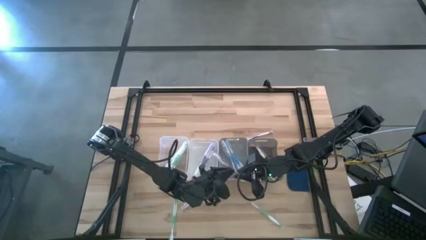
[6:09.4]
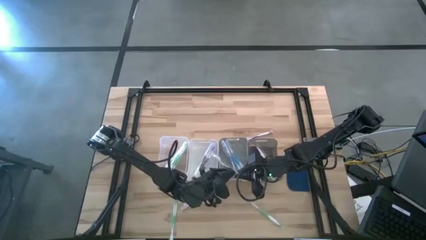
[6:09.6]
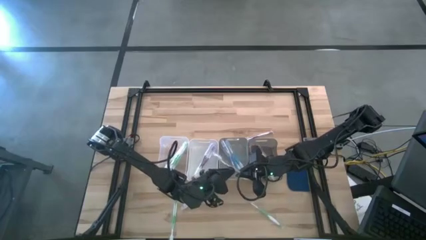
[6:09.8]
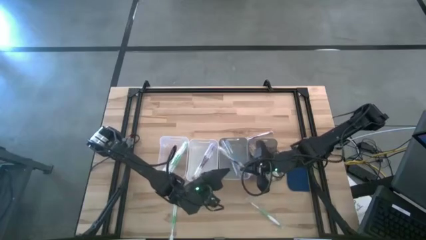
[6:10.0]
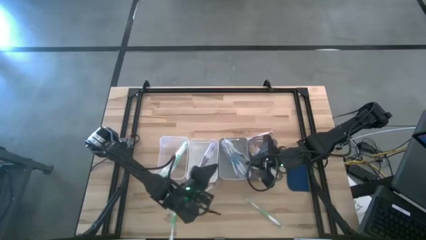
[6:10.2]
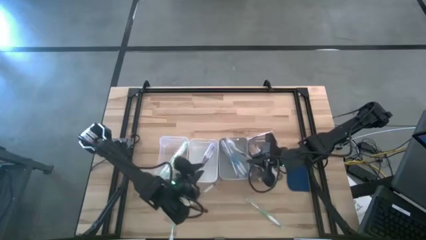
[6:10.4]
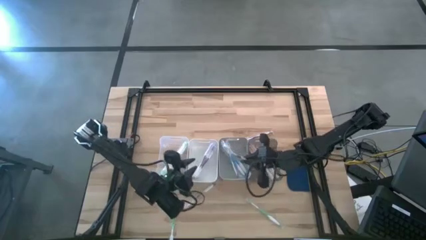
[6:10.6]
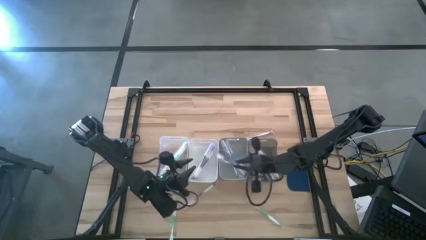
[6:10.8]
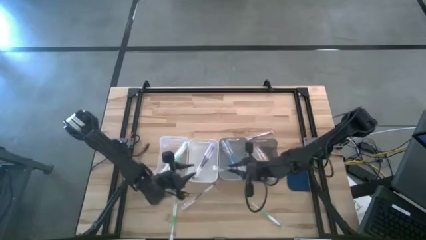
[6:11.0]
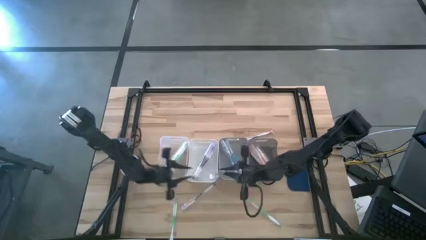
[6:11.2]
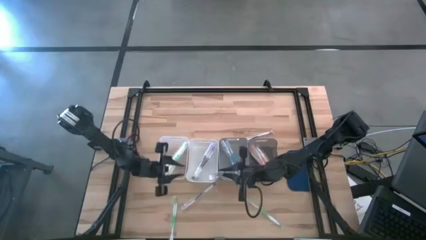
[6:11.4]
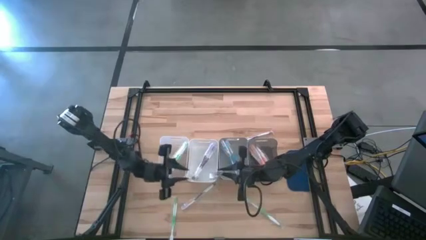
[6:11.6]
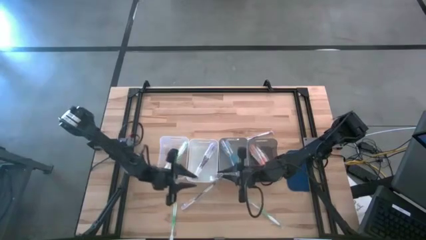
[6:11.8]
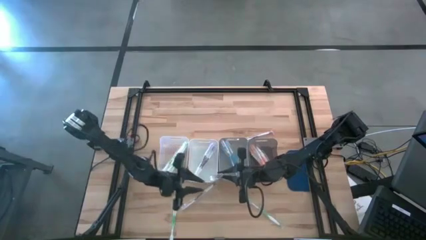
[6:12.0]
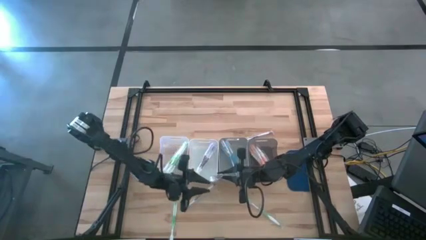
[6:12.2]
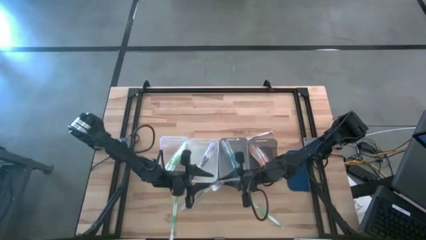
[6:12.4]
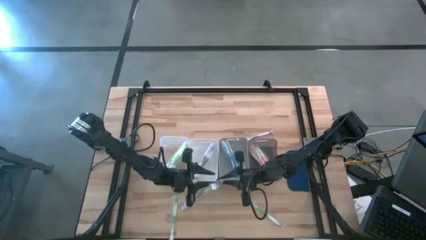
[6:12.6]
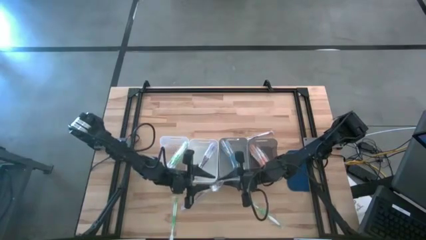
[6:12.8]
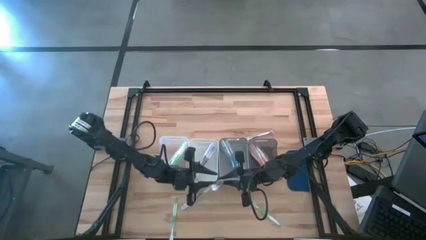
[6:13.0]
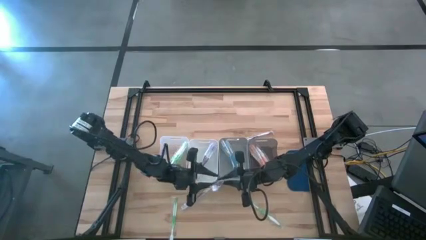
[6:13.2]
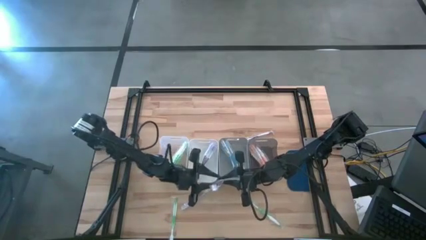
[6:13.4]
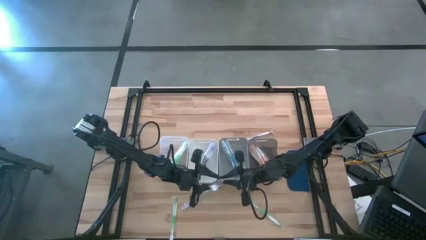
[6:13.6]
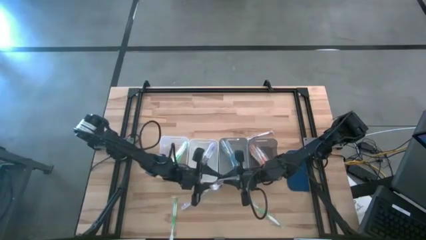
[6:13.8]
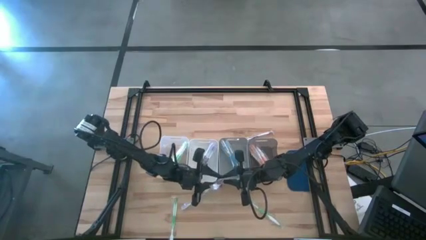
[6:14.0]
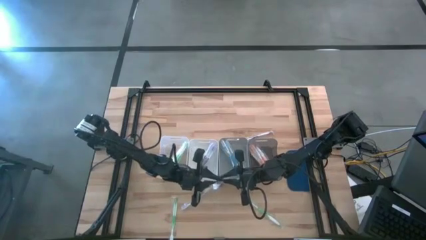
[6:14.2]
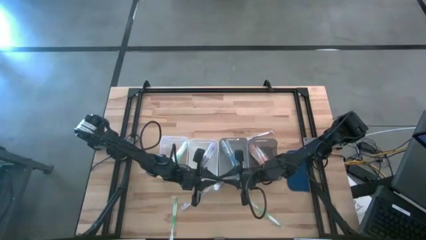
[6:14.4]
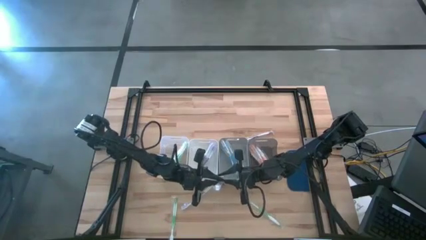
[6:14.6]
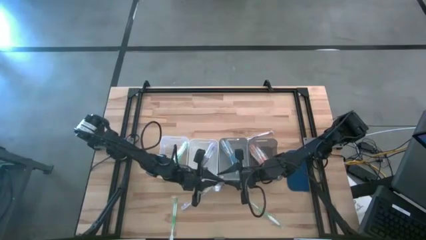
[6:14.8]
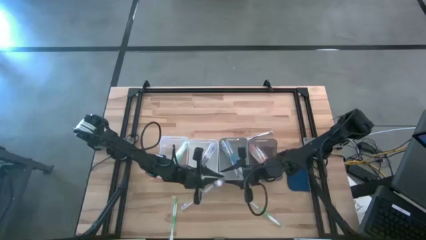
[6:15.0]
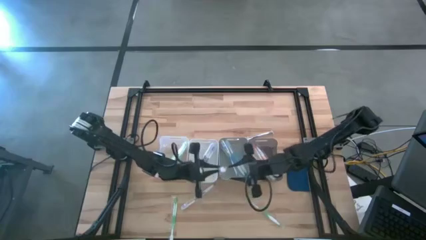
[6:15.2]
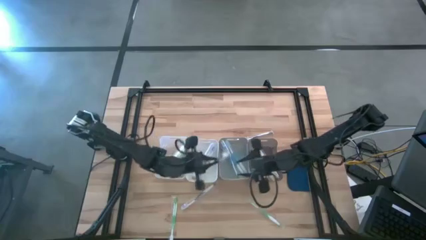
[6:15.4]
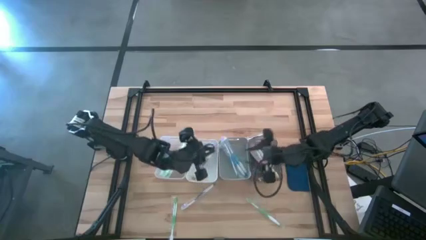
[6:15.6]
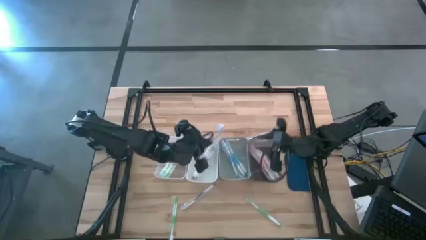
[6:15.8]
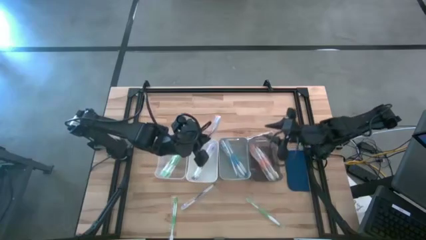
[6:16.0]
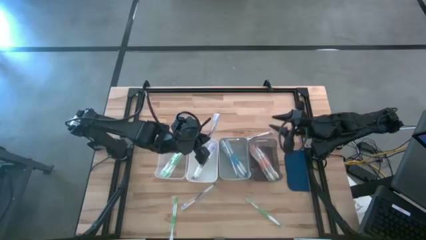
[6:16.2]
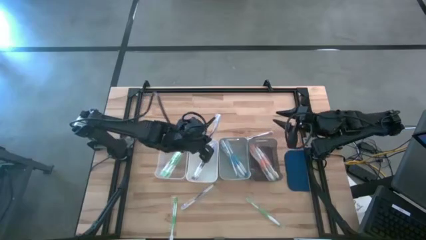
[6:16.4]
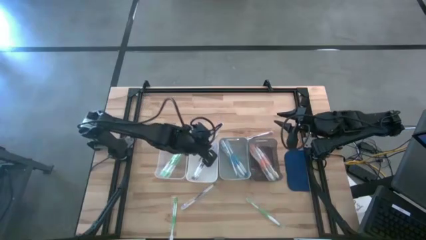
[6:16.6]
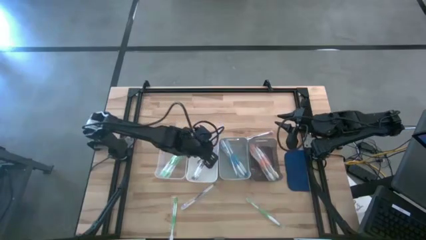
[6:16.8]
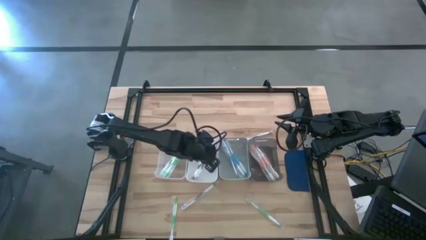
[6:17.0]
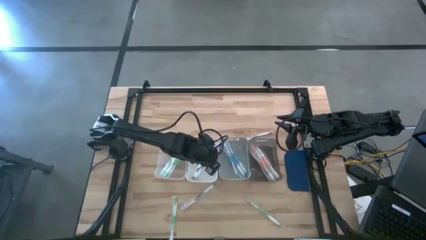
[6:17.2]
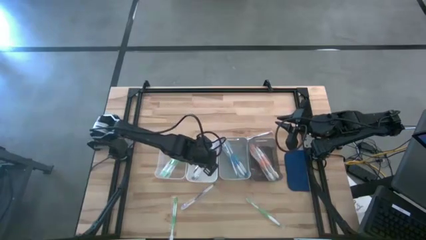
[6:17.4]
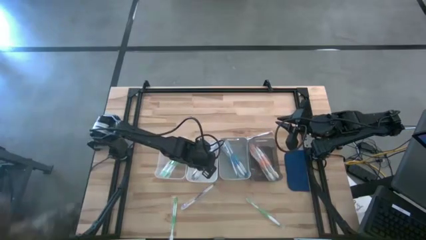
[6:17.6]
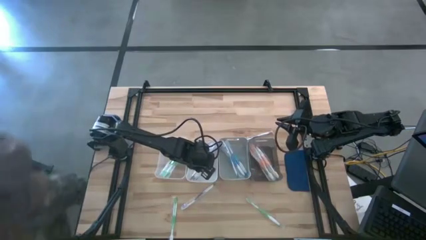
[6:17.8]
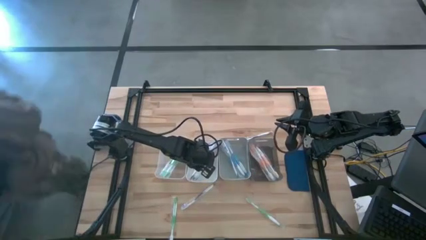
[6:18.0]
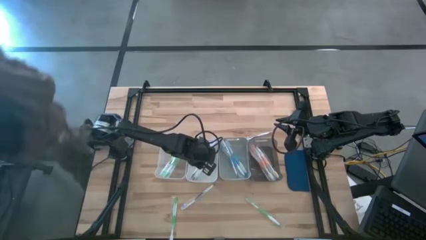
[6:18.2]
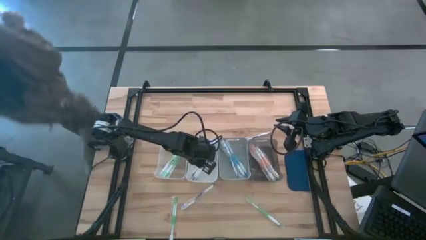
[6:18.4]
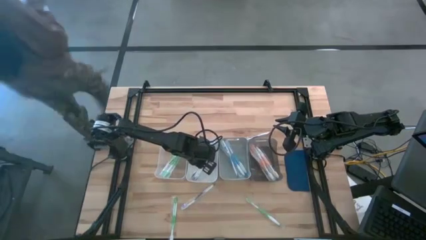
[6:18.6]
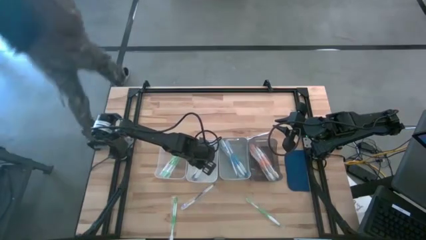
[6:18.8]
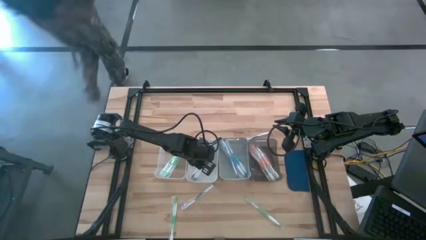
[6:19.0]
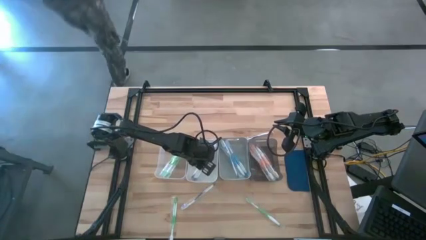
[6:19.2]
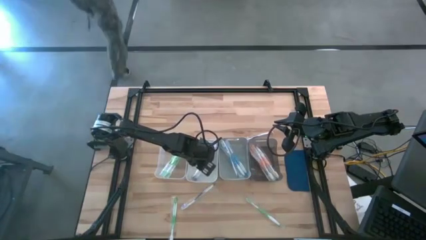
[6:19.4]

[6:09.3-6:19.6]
Task: Pick & Place Toothbrushes
Put the purple toothbrush into the white bin
